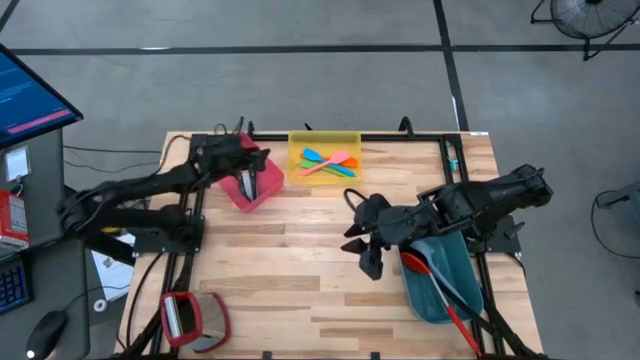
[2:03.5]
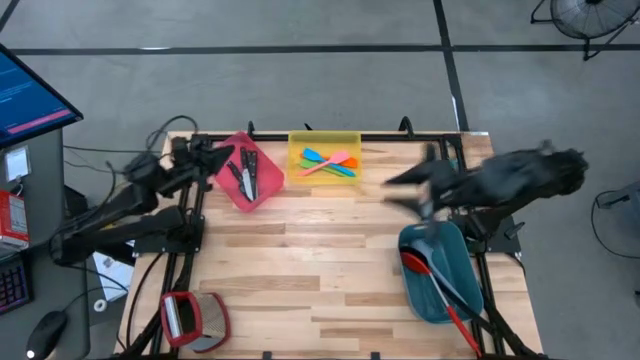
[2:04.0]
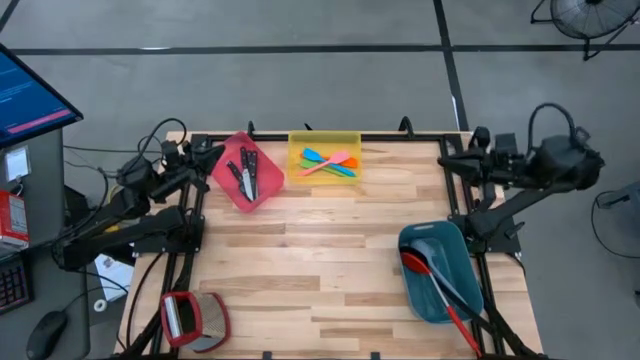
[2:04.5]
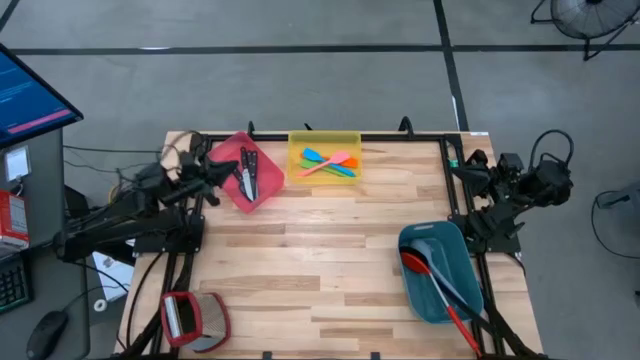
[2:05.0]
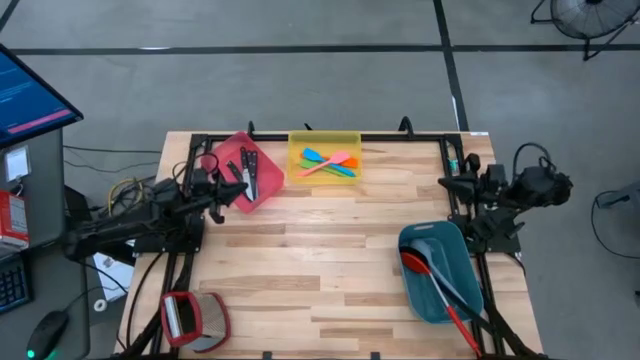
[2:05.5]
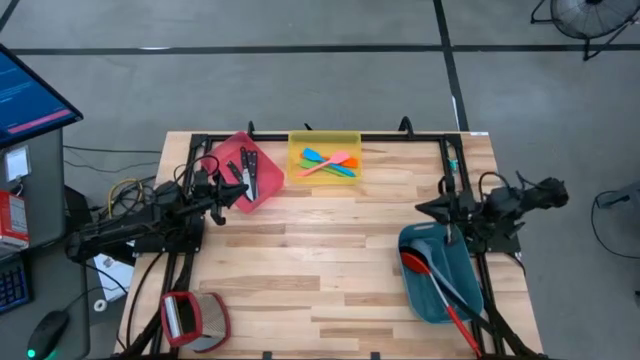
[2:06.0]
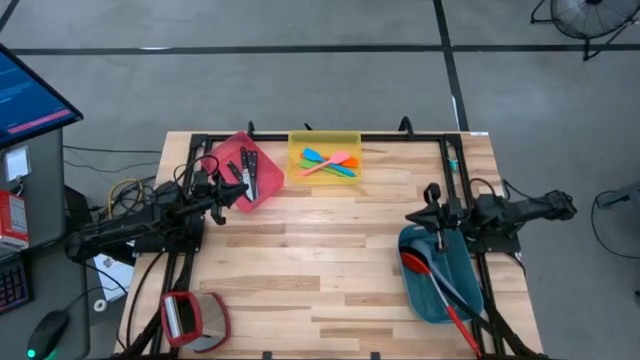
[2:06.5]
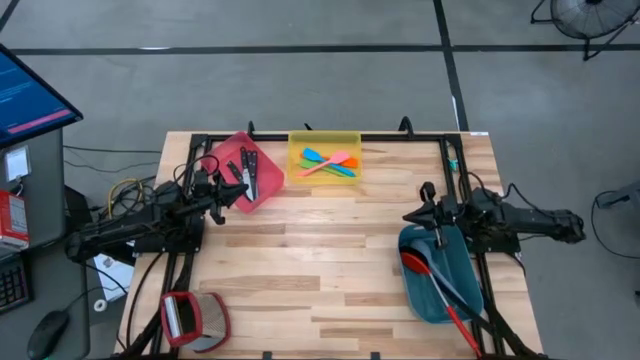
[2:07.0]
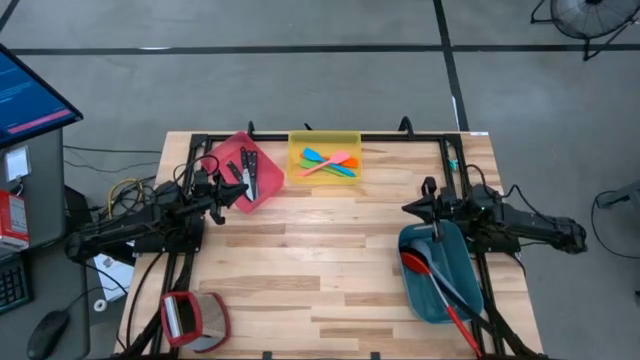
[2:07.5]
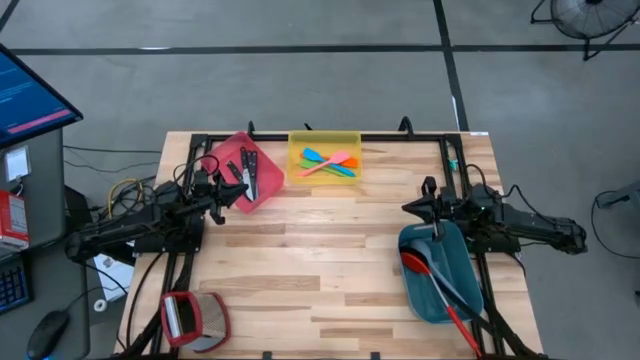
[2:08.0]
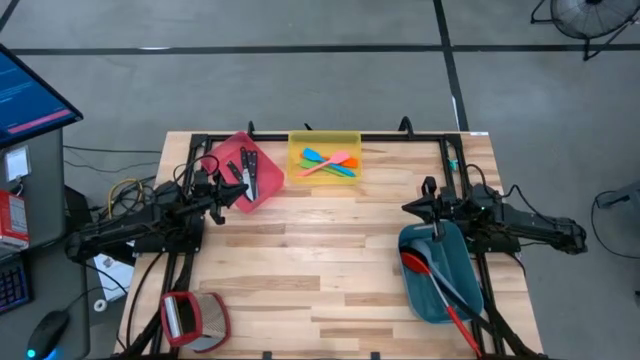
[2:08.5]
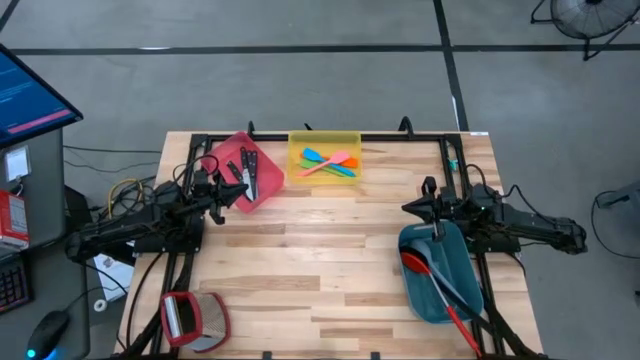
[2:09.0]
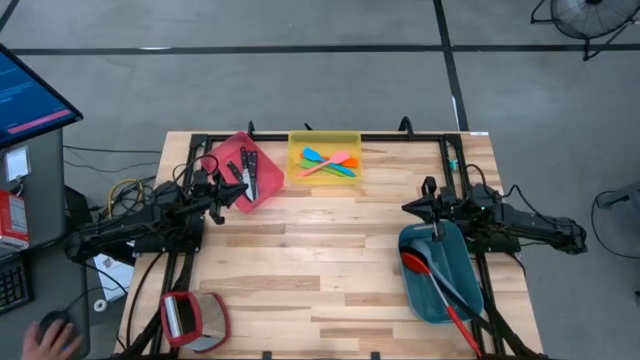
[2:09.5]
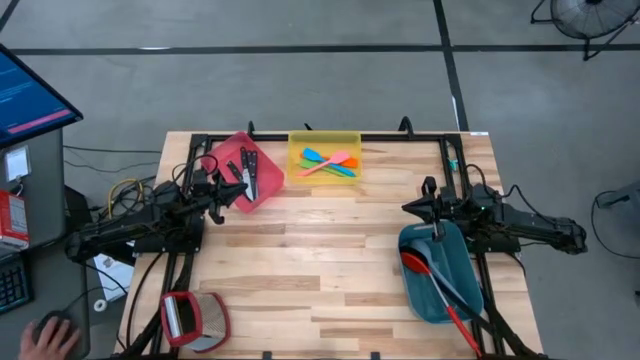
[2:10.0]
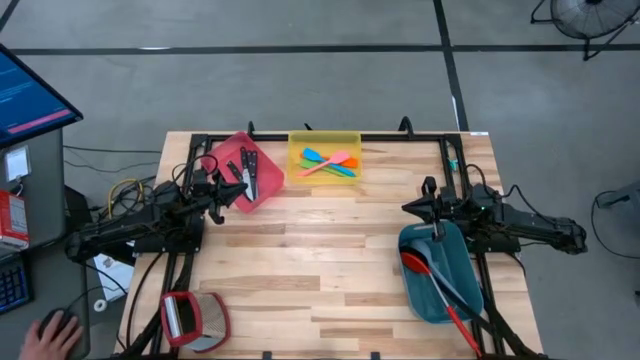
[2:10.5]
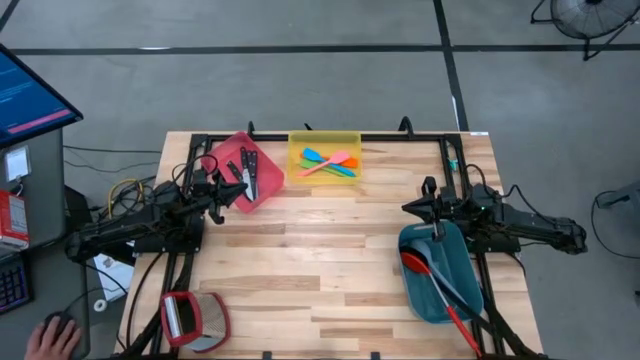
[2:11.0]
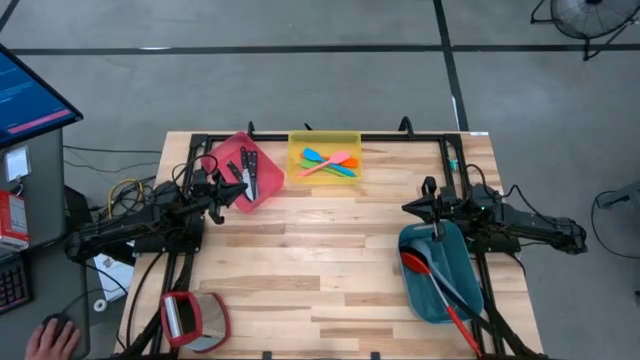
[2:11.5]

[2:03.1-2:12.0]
Task: Pick & Place Kitchen Items
Return to Home Position

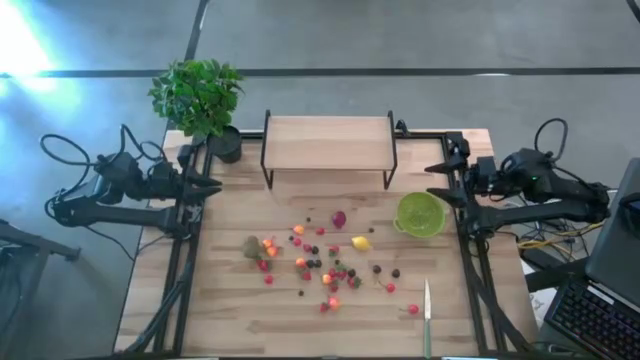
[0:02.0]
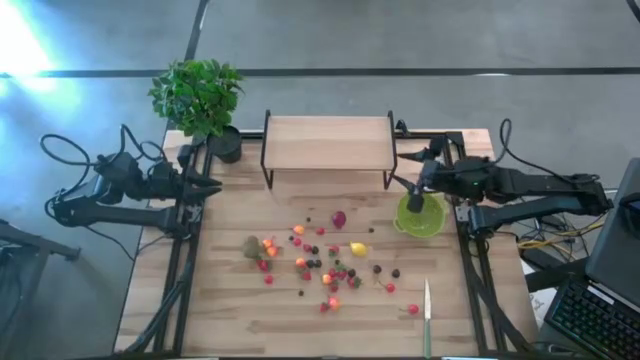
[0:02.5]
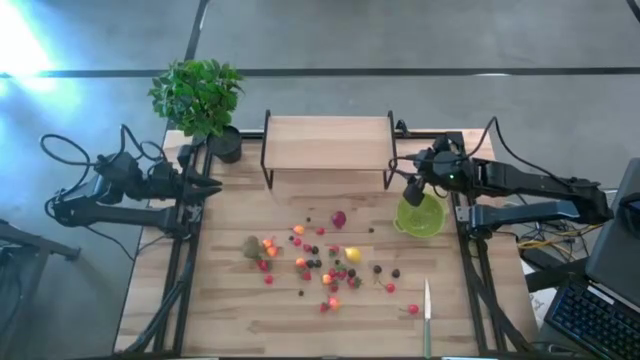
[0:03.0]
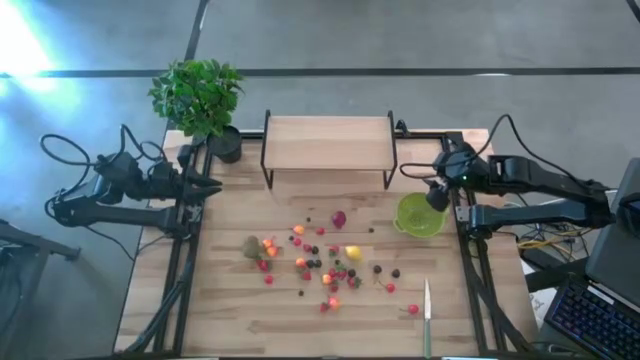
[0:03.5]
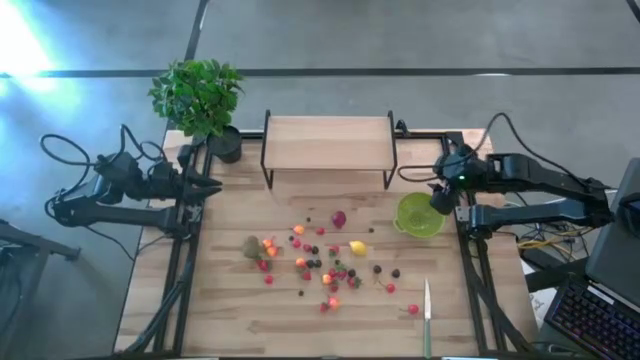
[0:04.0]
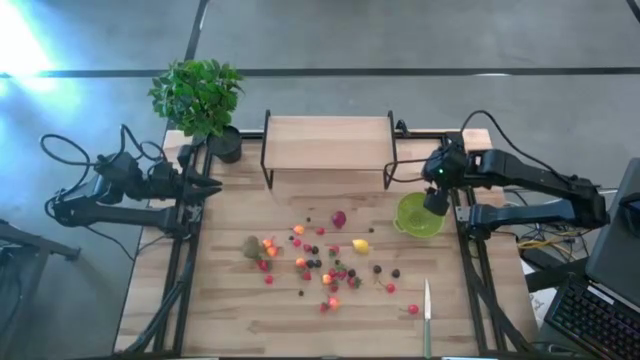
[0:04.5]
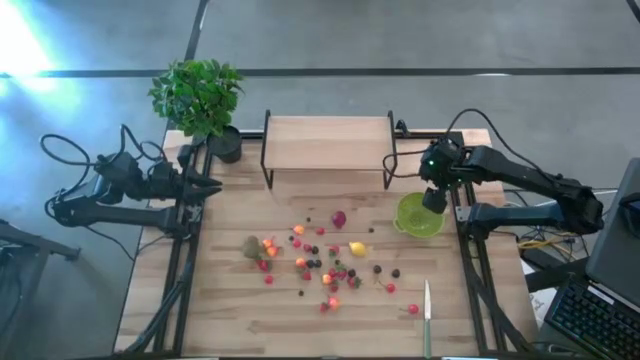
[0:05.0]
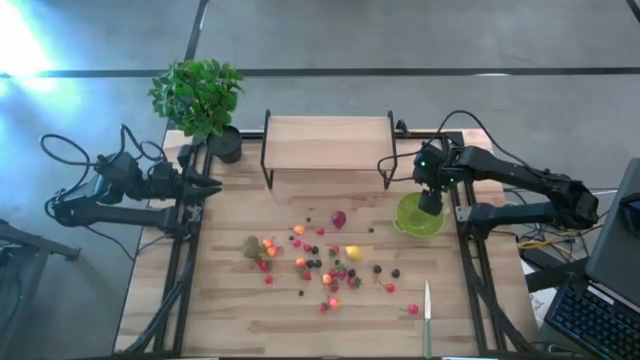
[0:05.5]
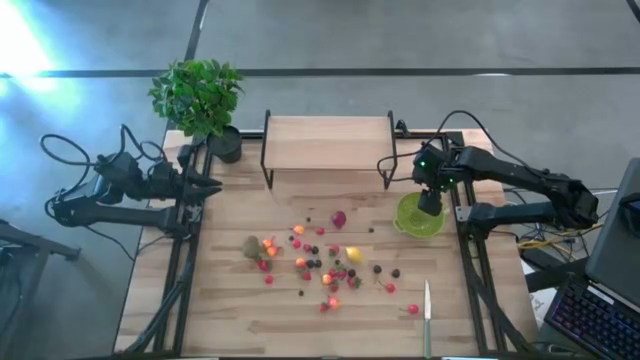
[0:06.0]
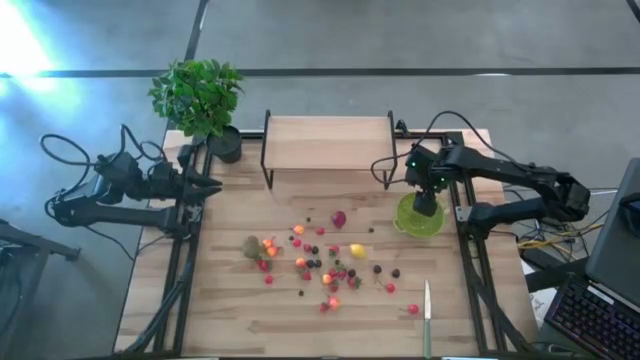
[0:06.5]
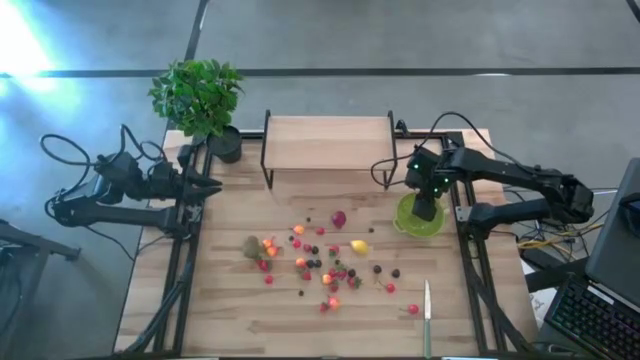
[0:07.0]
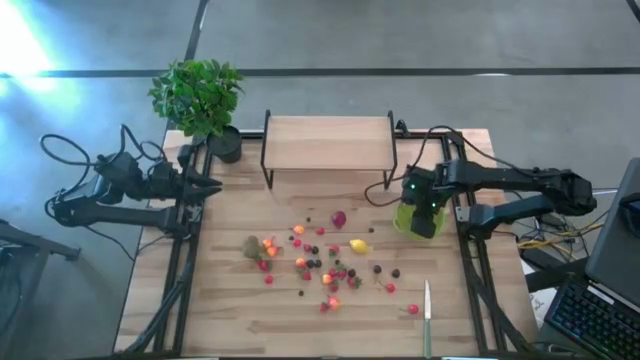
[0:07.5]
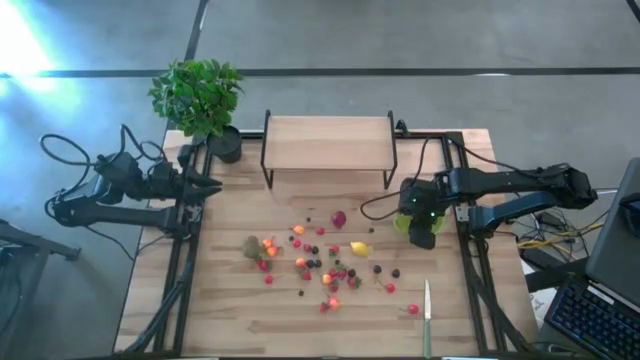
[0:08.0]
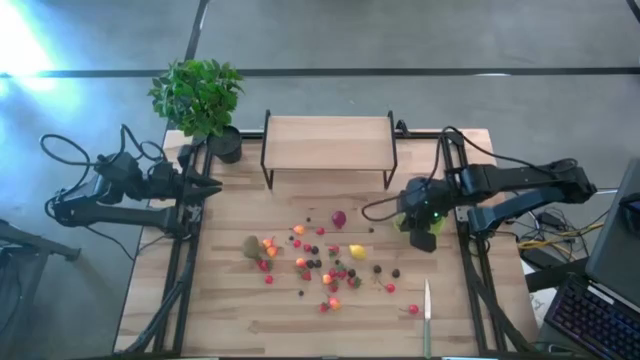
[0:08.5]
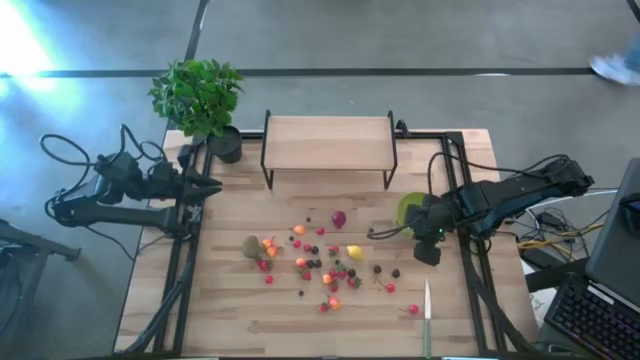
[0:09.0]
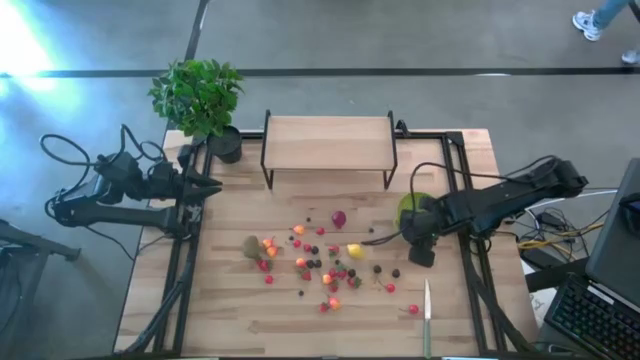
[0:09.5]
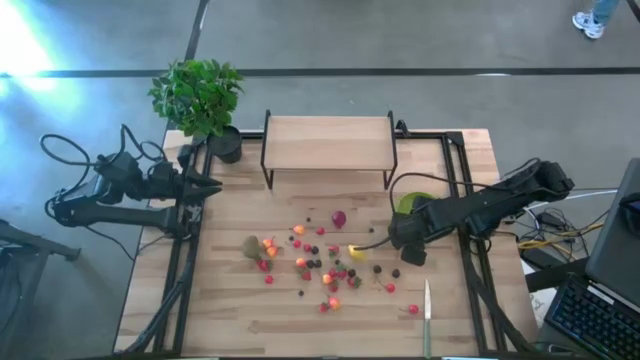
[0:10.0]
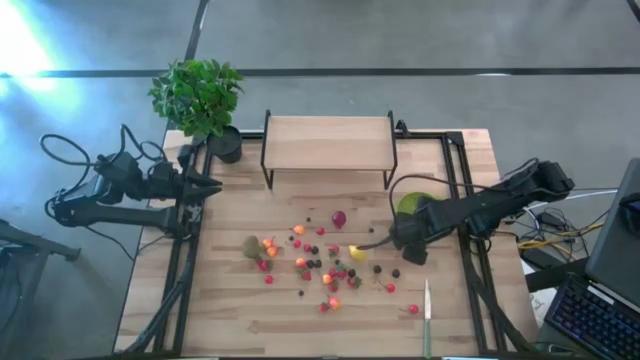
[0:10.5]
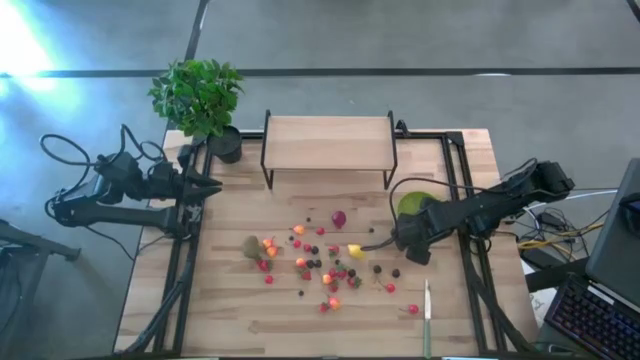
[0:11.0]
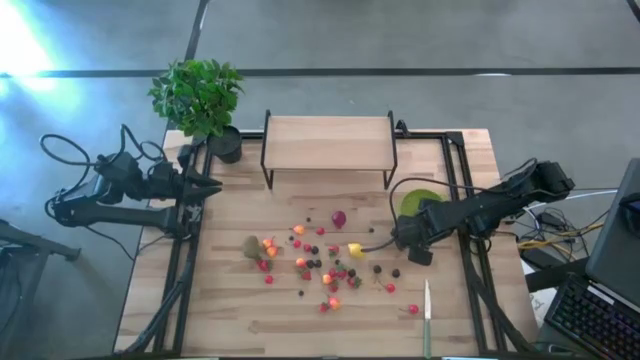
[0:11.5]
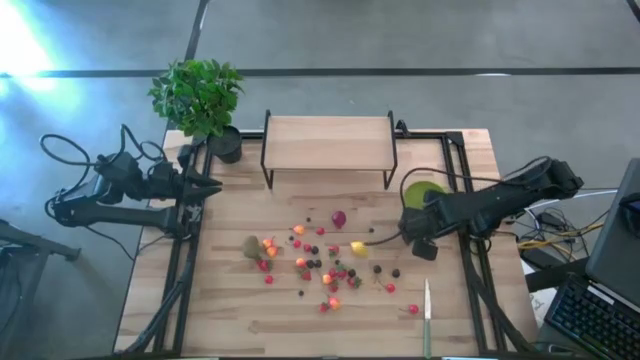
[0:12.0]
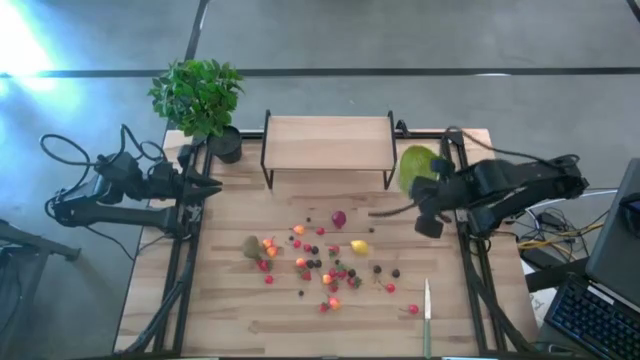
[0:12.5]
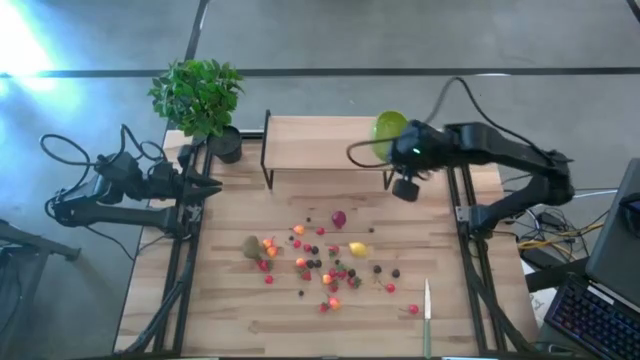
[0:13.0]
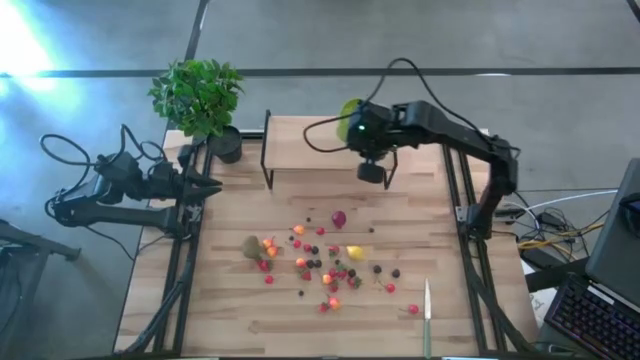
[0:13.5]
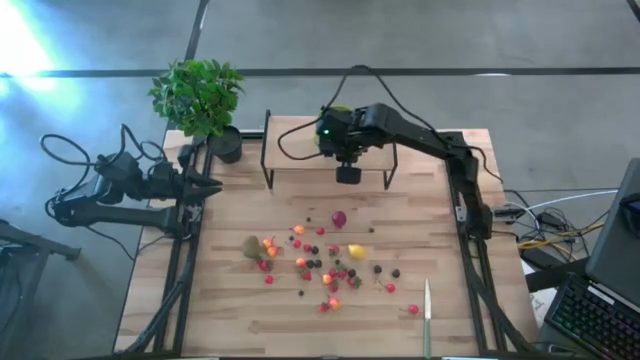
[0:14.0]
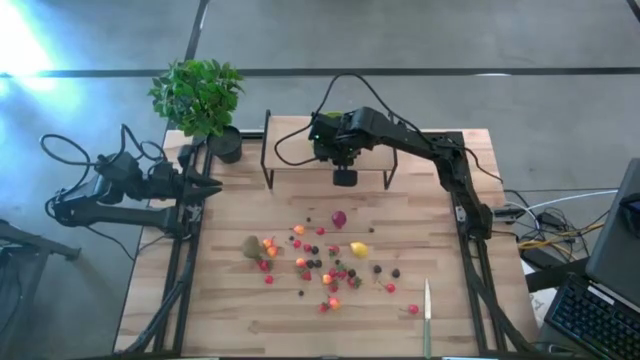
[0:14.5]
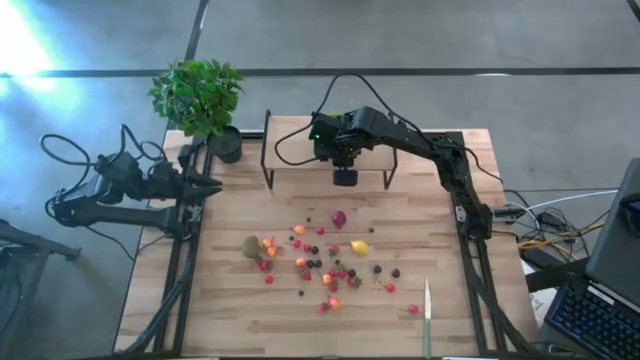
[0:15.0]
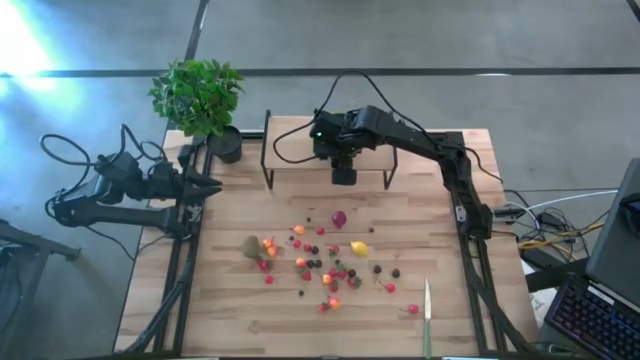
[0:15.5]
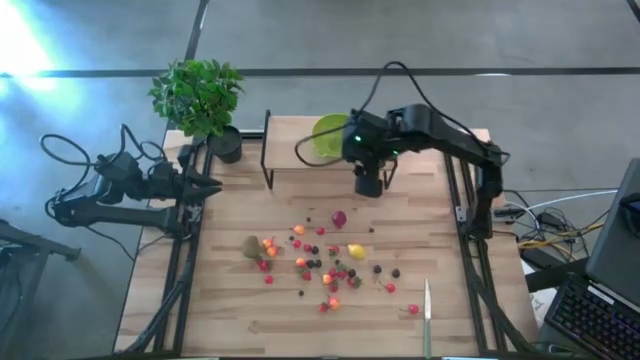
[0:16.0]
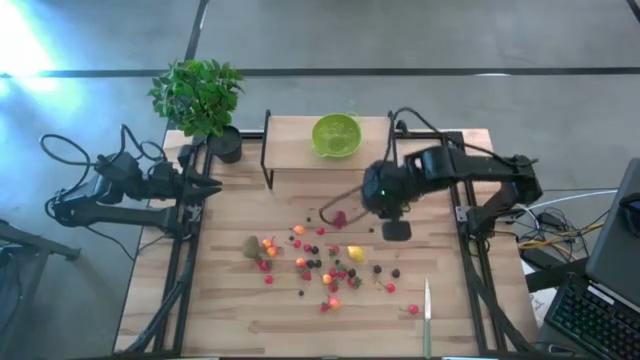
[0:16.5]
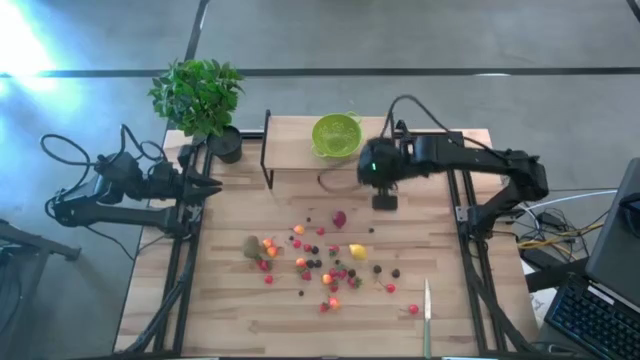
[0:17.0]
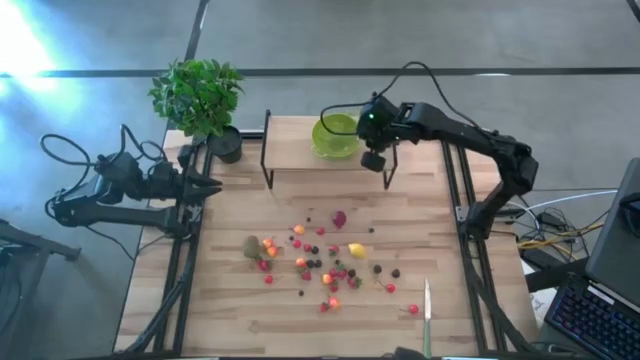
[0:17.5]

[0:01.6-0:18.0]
Task: Pick & Place Fruit
Put the green strainer bowl on the shelf
